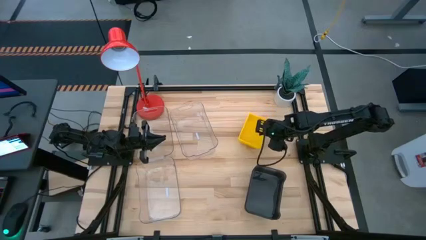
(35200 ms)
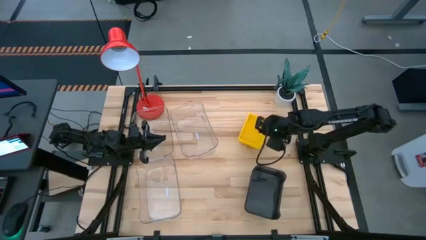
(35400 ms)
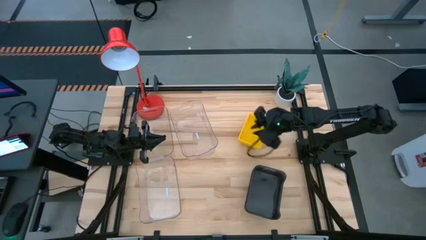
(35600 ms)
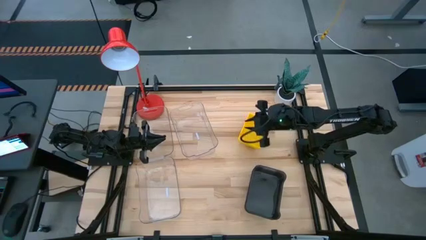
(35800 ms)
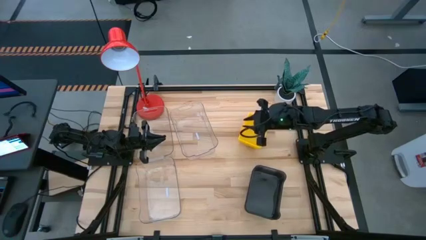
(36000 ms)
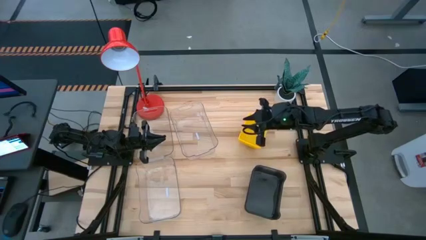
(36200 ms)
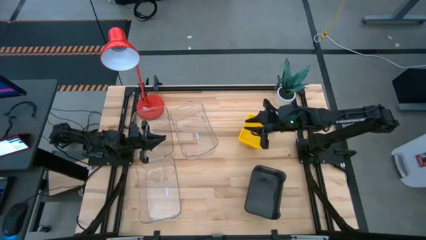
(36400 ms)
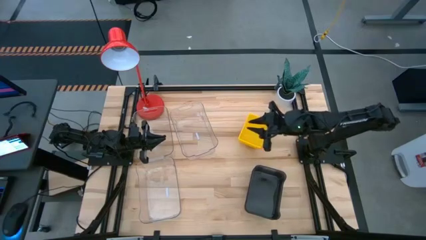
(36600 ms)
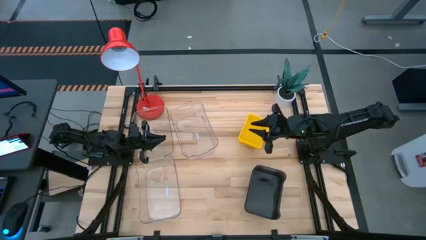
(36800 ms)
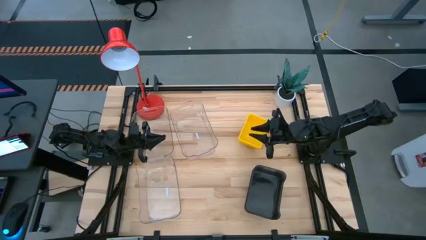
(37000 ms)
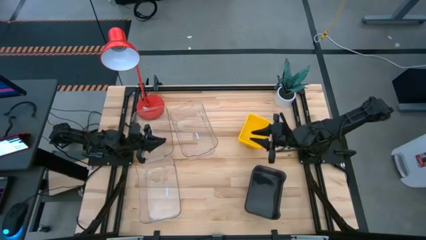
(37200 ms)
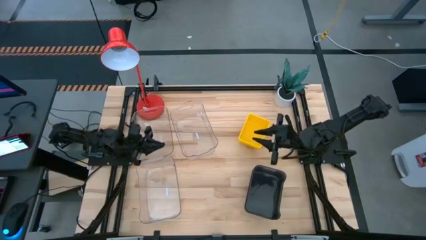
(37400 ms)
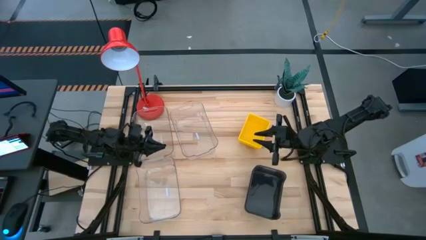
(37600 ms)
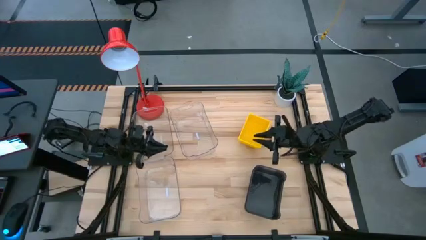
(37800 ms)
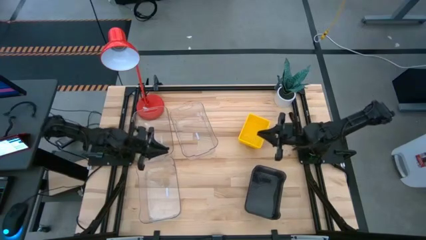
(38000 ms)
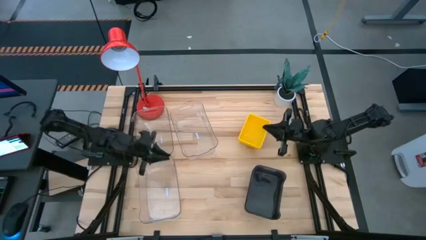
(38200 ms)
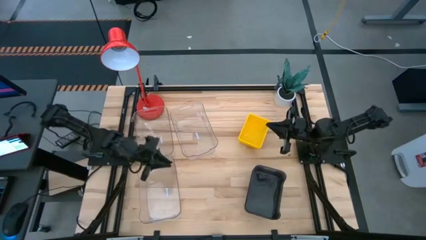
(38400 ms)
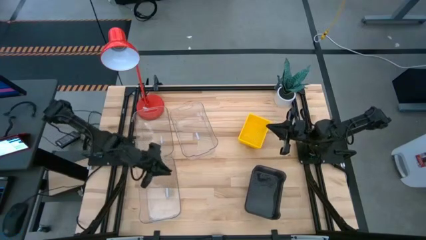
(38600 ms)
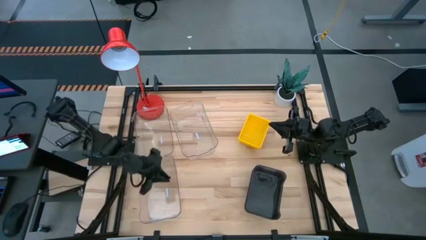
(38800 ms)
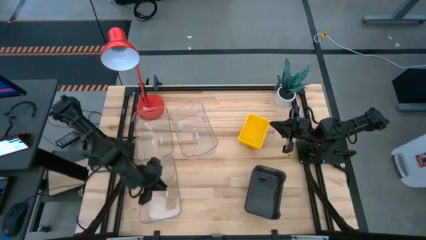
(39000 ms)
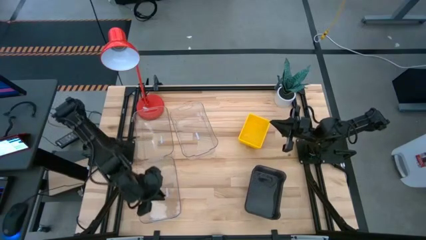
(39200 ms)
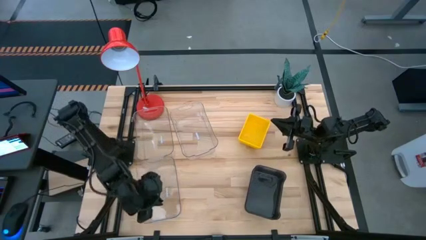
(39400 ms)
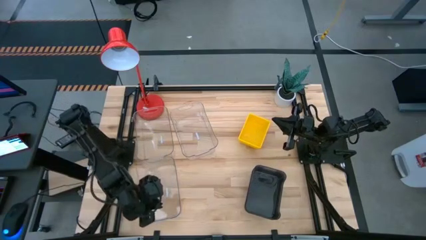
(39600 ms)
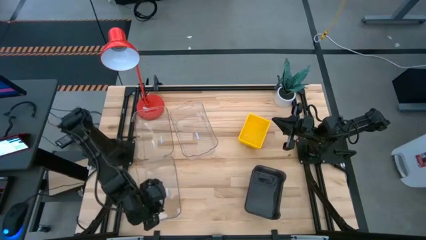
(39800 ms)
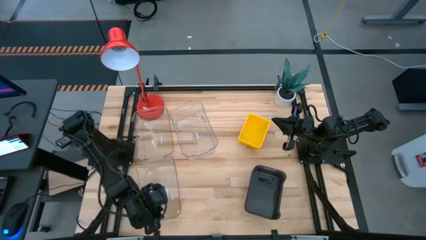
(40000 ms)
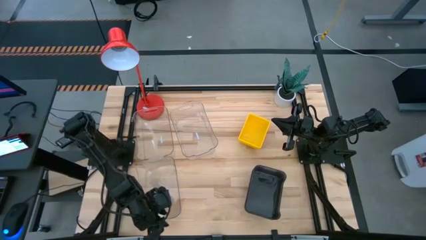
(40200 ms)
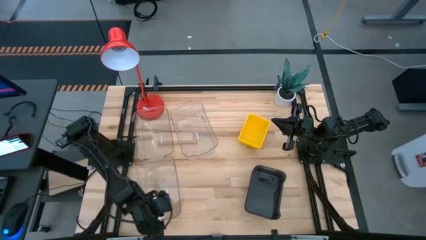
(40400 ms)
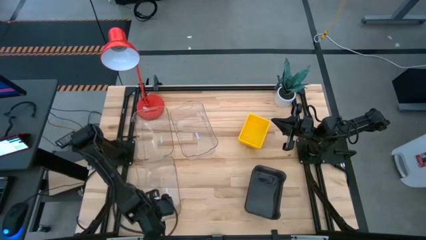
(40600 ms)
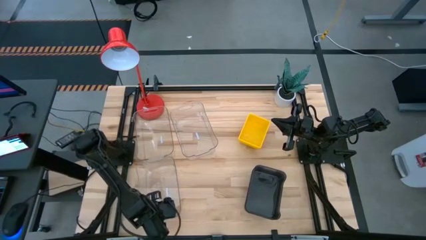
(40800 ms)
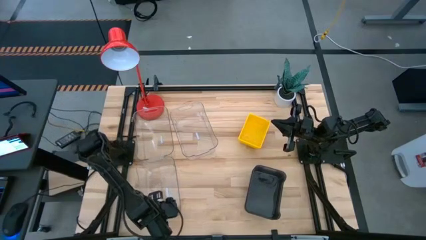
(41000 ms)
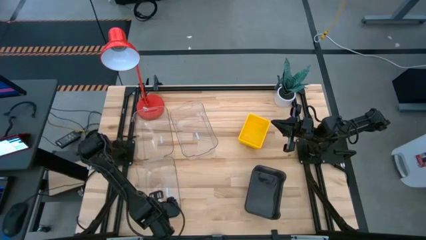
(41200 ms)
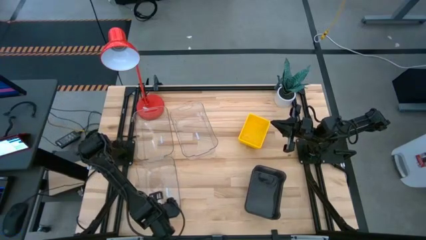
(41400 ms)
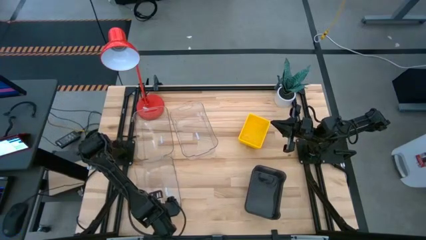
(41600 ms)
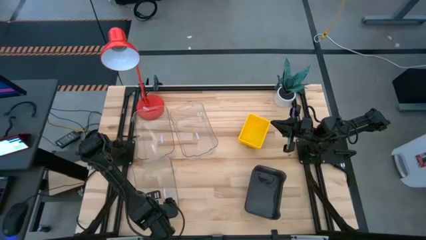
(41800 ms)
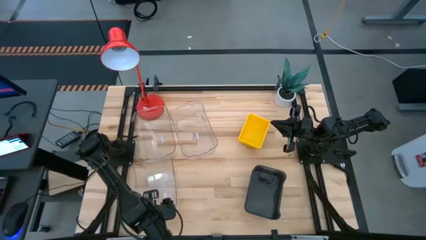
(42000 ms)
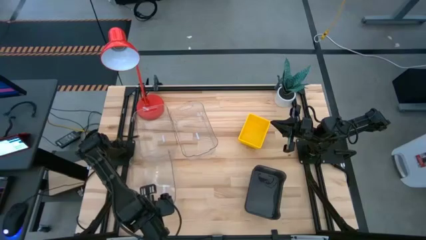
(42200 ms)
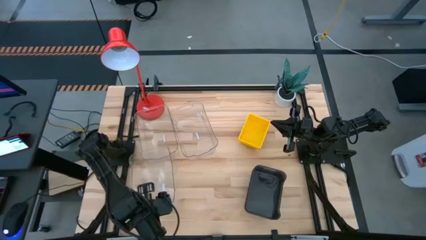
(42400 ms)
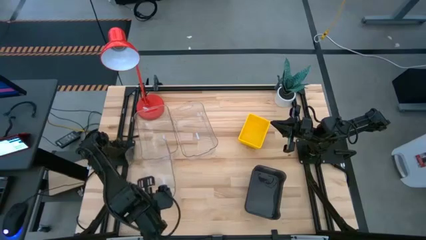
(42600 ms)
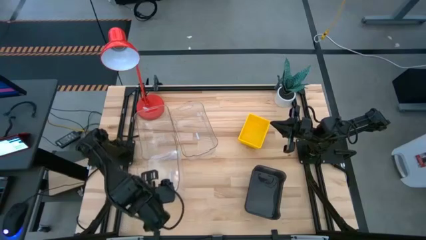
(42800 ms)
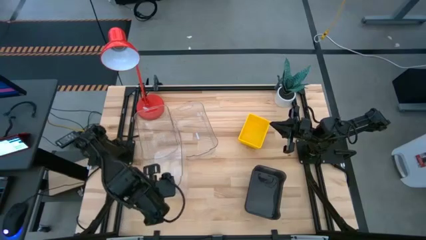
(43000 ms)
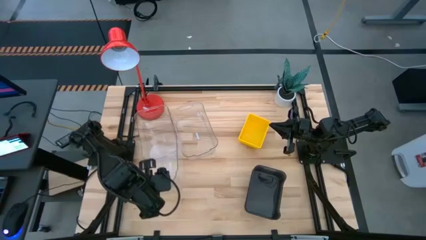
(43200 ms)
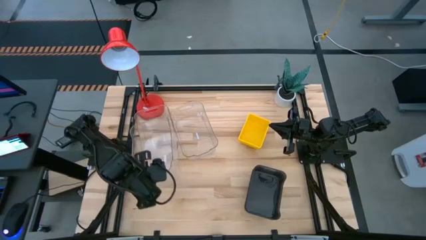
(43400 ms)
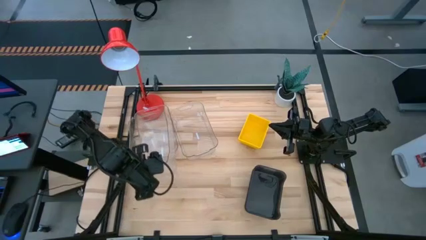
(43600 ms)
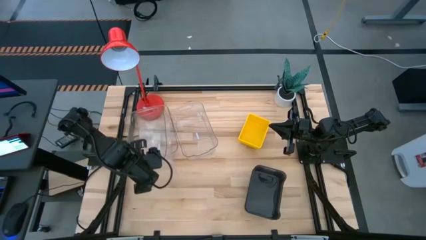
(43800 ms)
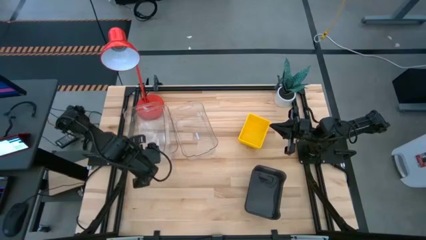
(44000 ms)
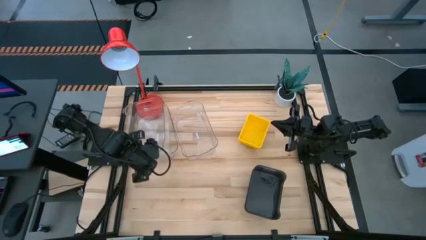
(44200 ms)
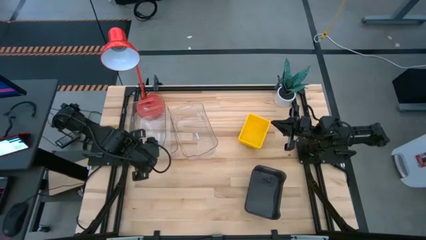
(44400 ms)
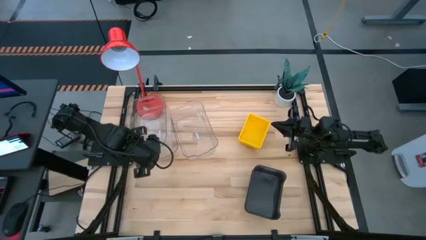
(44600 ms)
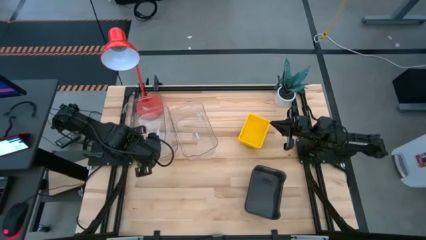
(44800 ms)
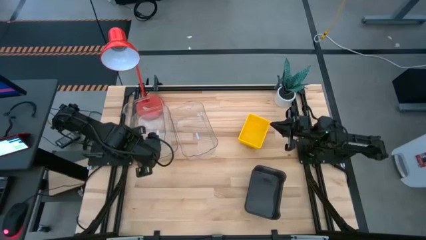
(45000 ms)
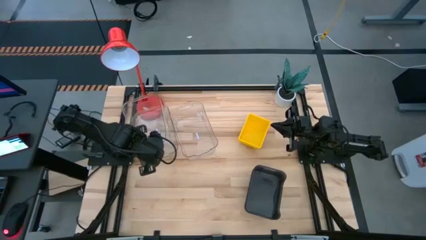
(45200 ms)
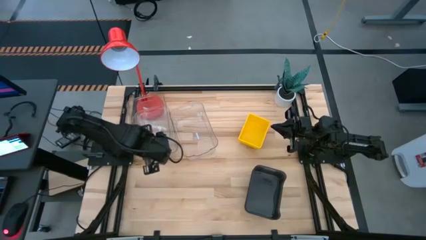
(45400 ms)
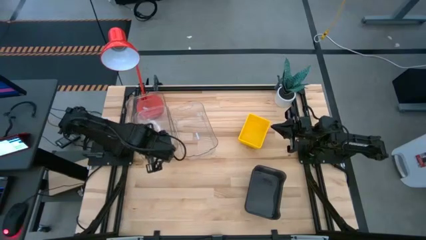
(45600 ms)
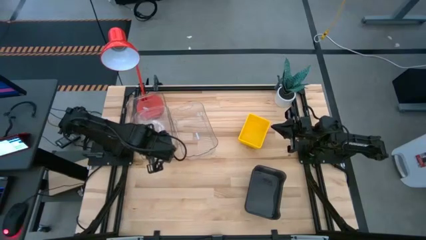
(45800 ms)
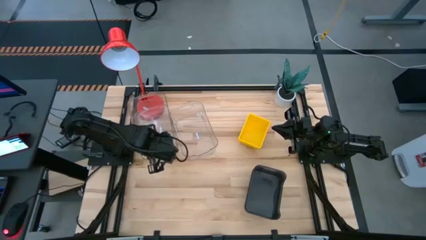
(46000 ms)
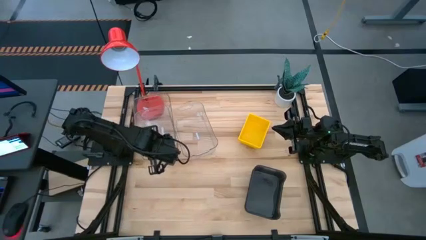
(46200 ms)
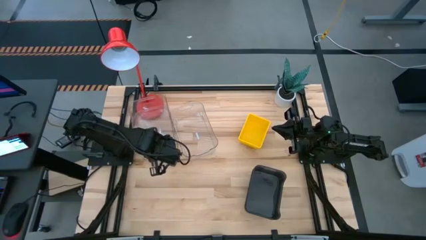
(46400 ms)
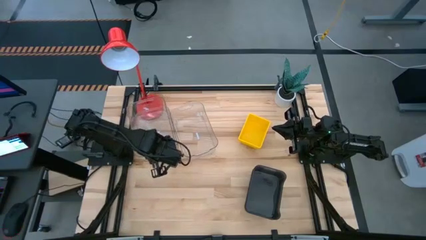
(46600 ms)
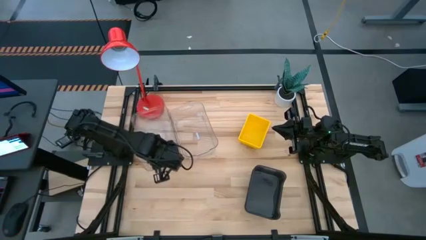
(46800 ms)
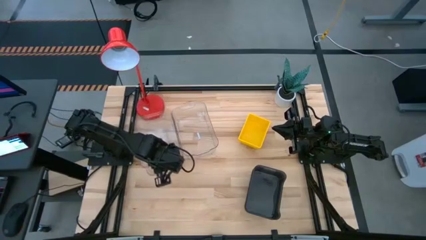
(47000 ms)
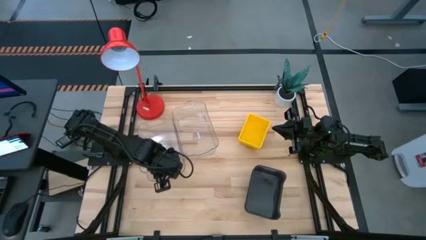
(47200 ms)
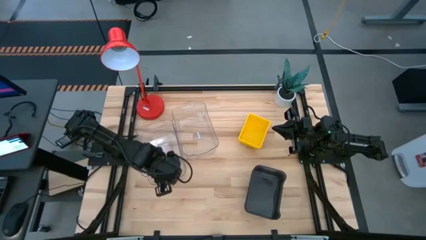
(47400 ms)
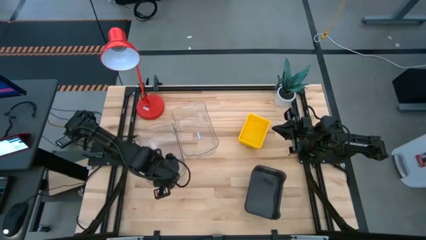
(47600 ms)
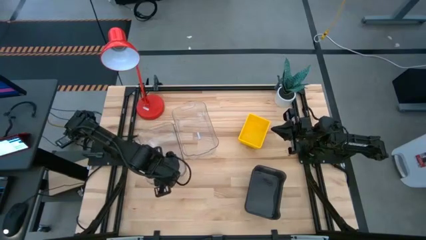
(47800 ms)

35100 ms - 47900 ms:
Stack the bottom left transparent bin on the left transparent bin

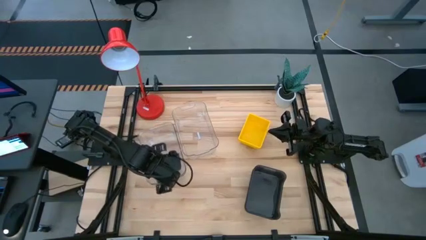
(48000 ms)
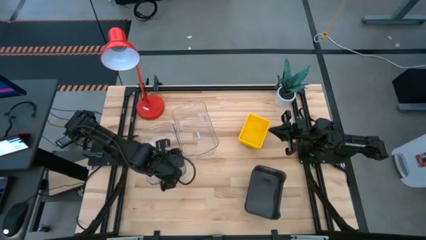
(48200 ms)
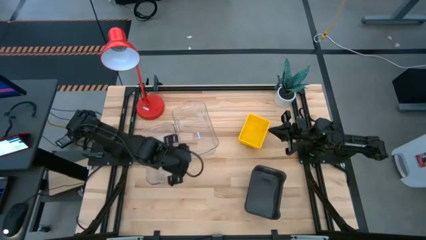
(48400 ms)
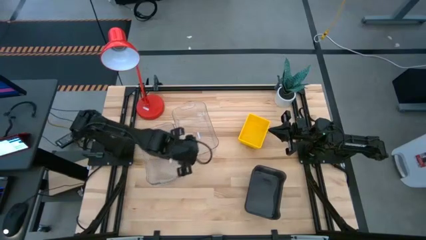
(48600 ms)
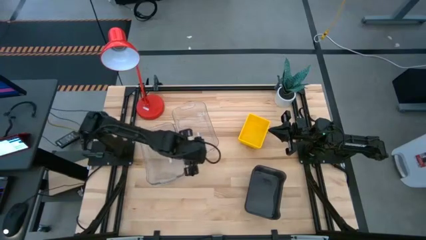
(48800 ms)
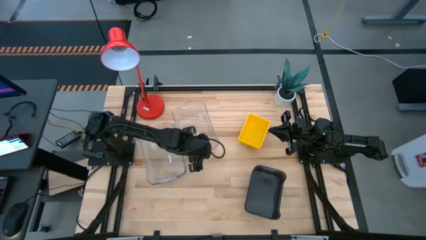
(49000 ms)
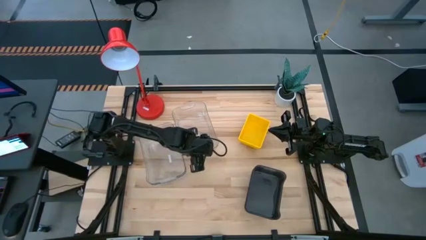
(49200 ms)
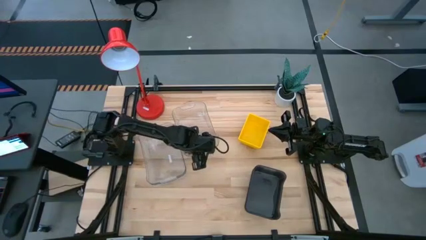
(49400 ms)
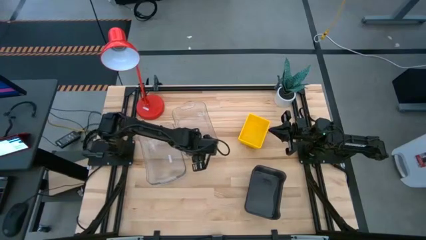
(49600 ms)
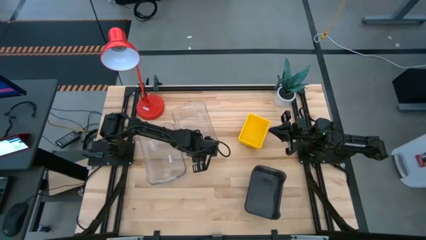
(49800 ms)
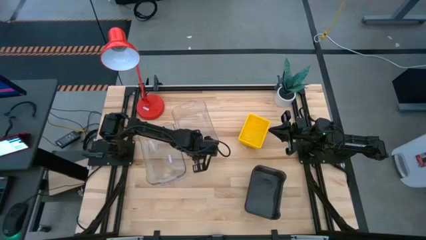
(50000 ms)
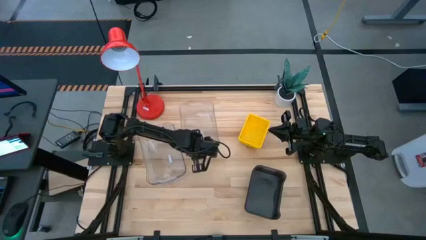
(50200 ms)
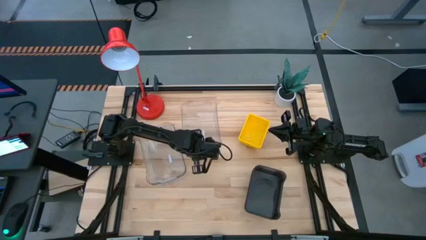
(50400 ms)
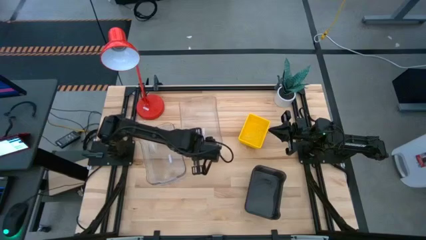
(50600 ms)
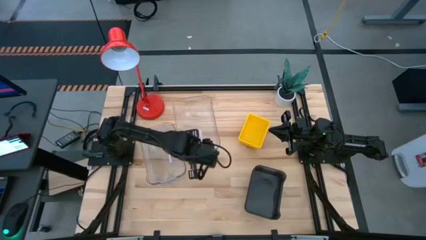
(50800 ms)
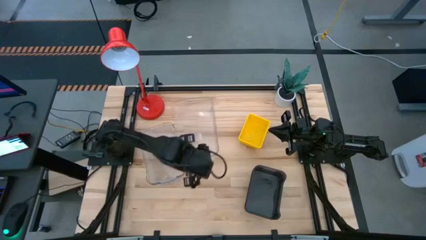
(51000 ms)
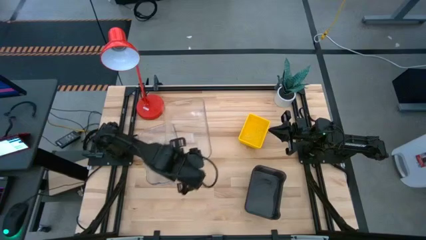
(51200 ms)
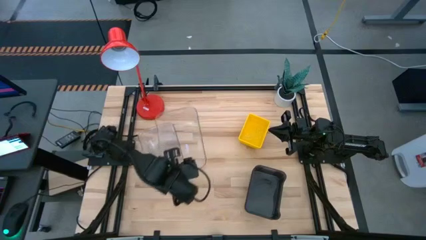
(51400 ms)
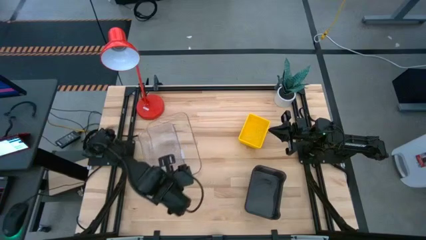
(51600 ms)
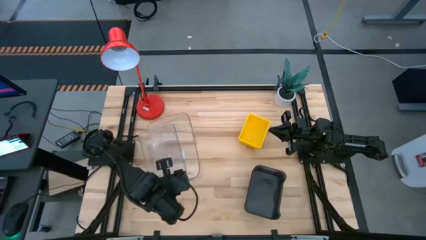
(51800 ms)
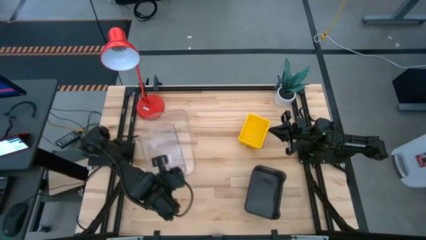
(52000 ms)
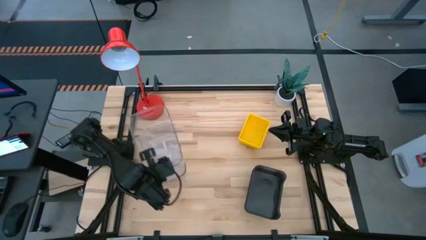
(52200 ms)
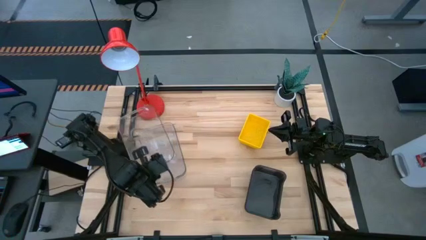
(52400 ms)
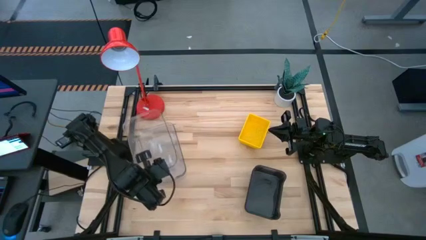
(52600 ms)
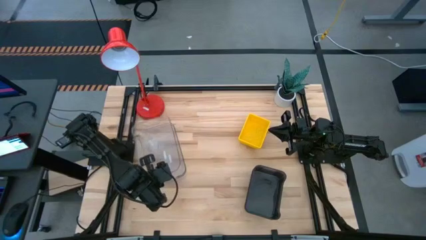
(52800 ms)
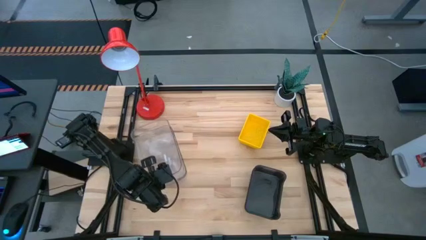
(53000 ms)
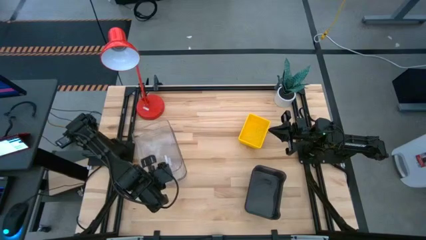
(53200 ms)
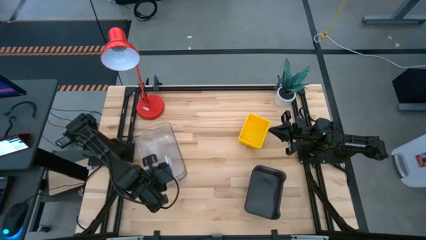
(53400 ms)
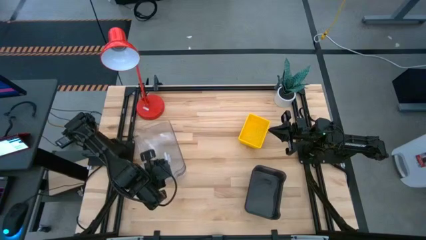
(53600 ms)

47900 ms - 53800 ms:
Stack the right transparent bin on the transparent bin
